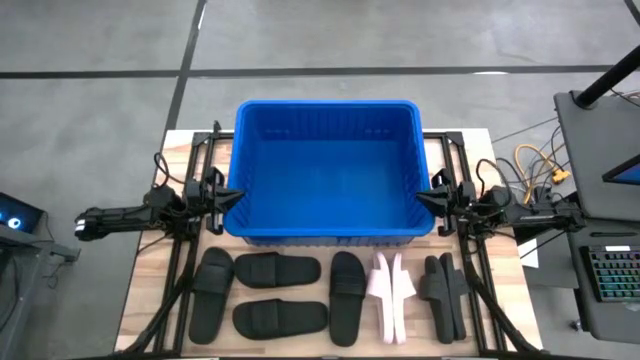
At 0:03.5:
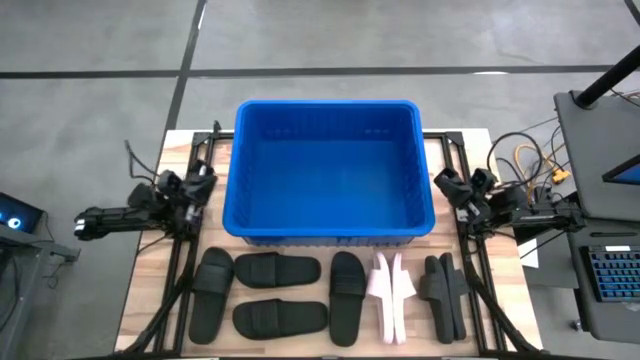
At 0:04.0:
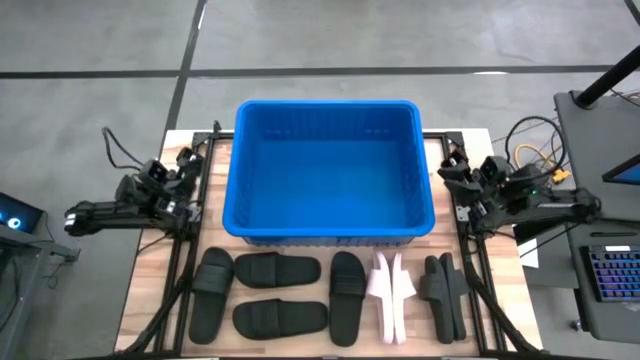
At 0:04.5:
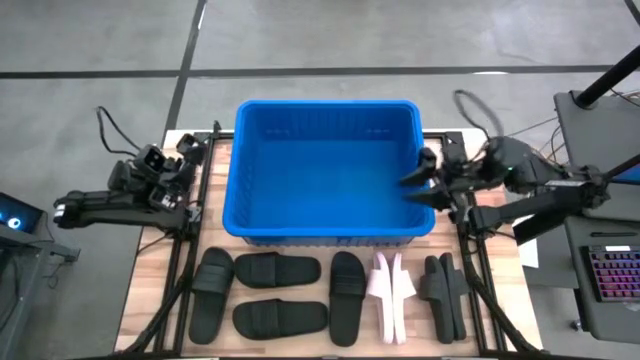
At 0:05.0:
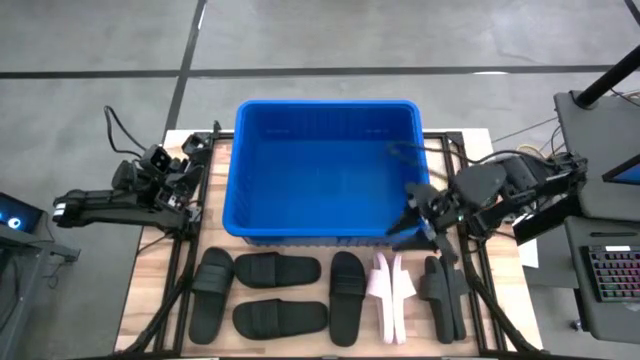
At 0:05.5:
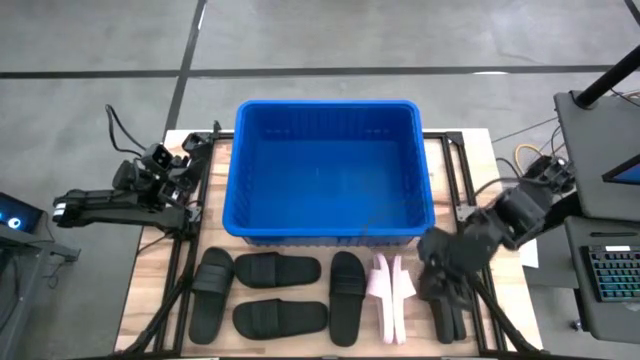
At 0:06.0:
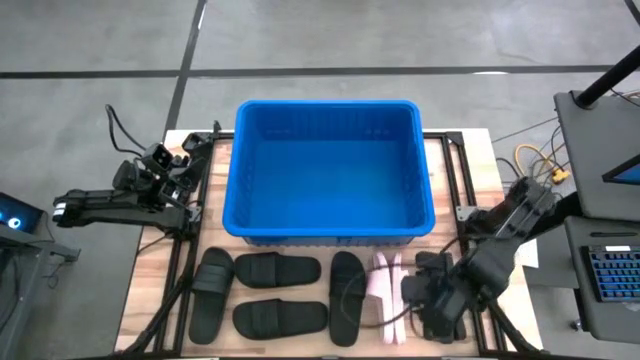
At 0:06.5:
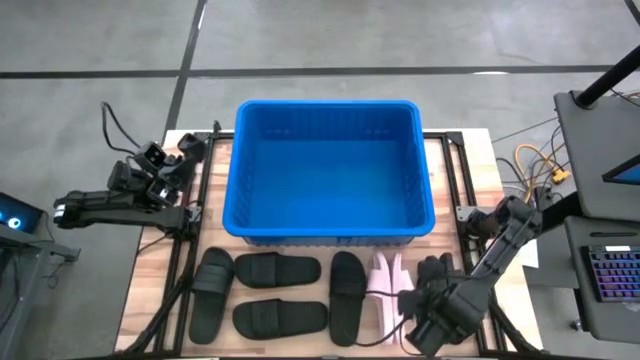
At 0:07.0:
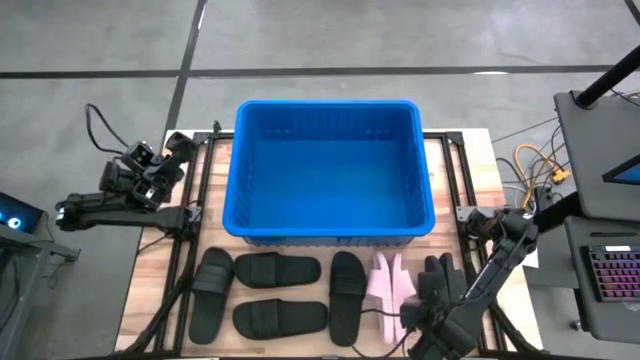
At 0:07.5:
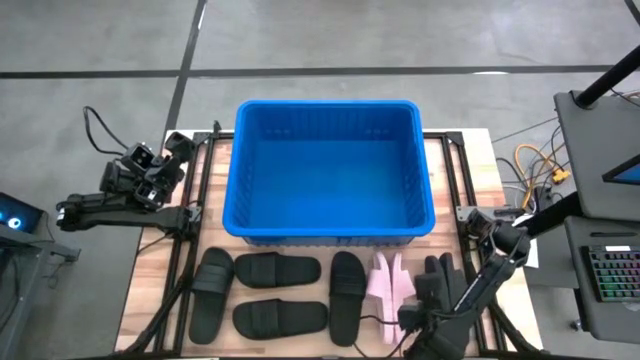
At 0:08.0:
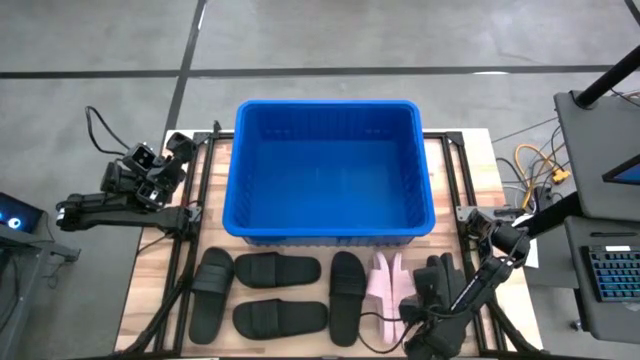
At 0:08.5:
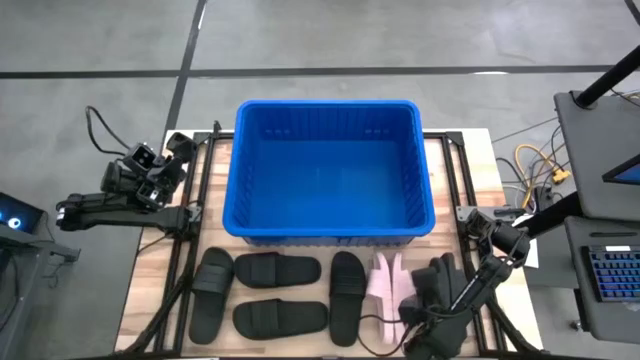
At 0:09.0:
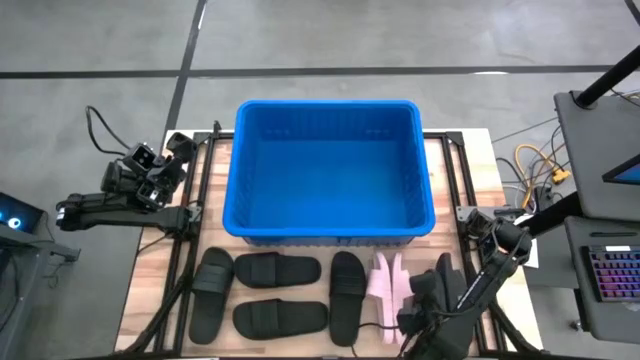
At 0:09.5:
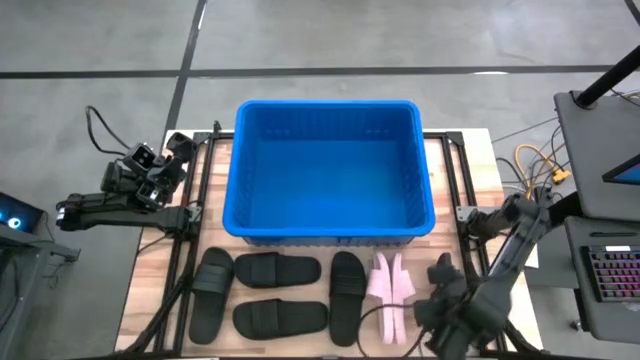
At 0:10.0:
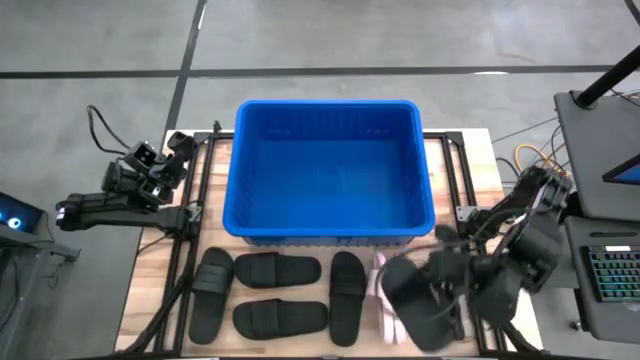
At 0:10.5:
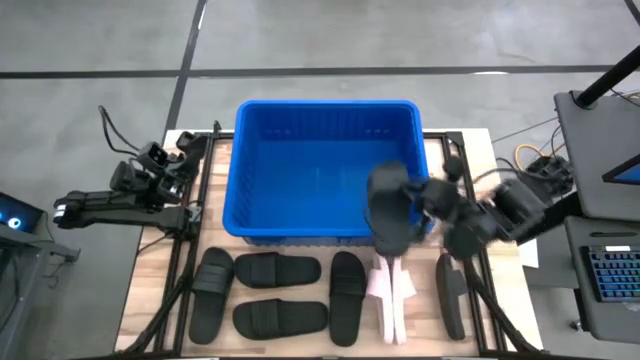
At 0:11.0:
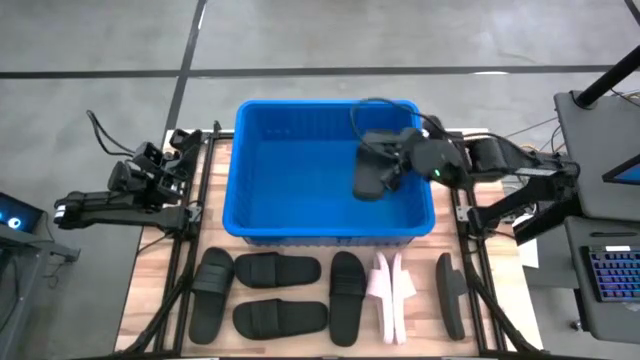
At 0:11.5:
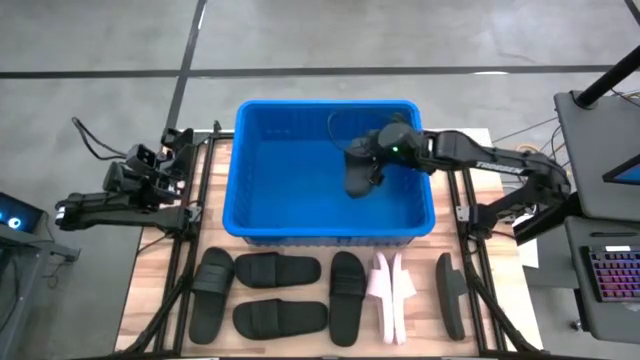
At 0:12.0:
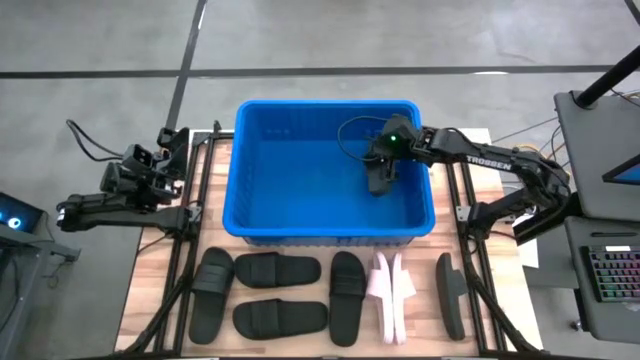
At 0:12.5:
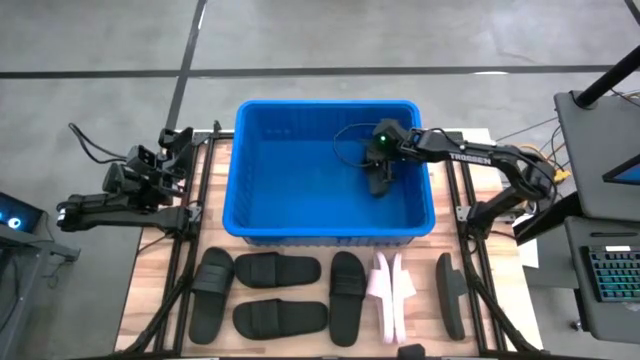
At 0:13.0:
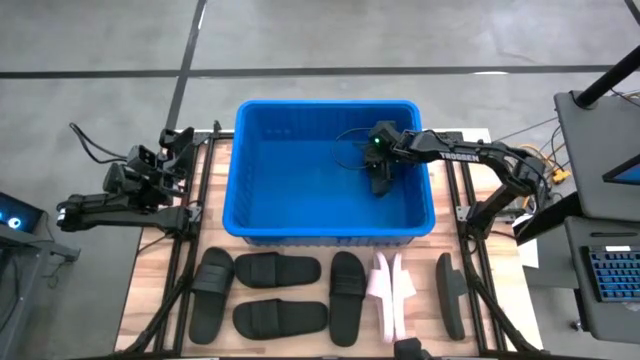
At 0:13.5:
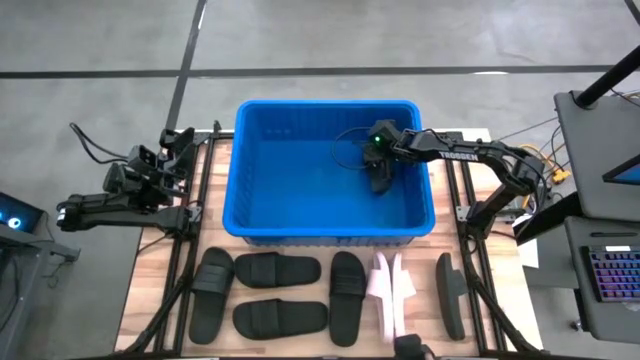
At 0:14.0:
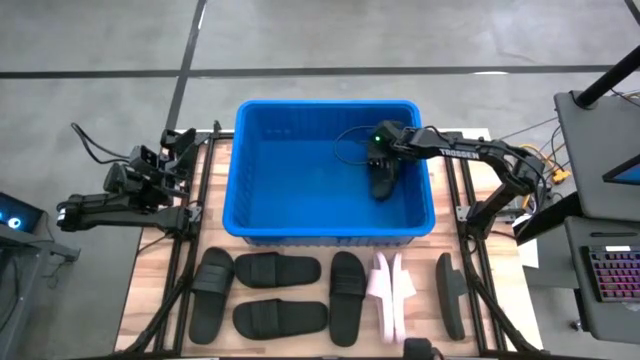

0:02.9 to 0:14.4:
Task: Pick and place slides into bin
Put the black slide into the blue bin

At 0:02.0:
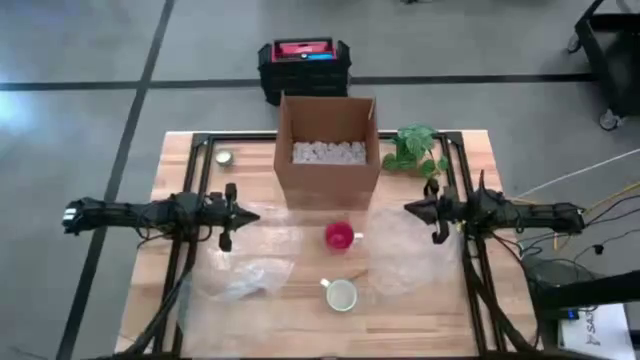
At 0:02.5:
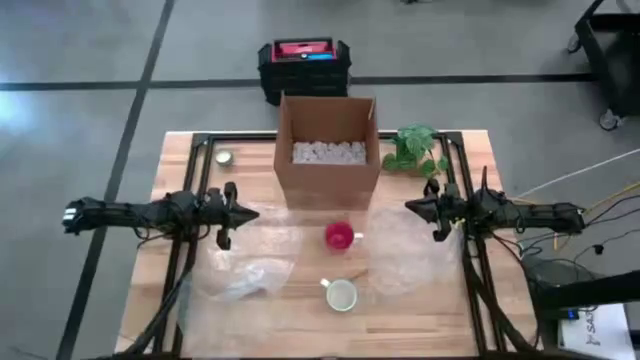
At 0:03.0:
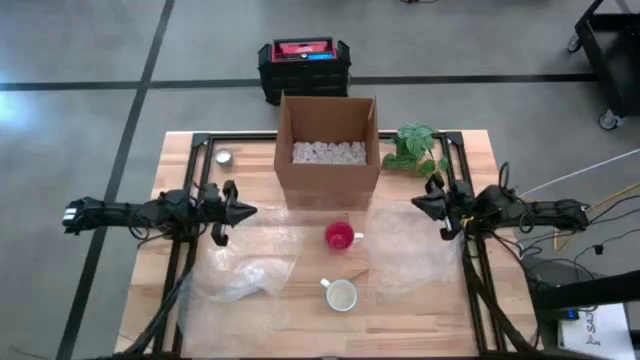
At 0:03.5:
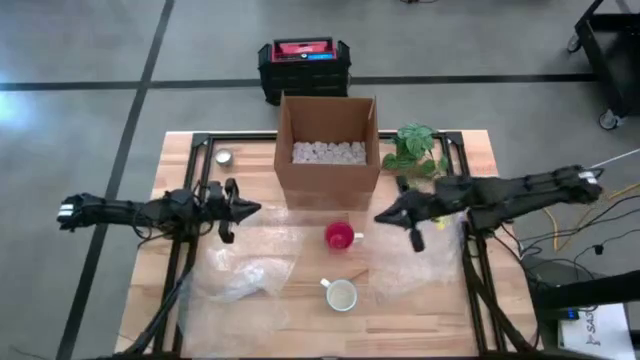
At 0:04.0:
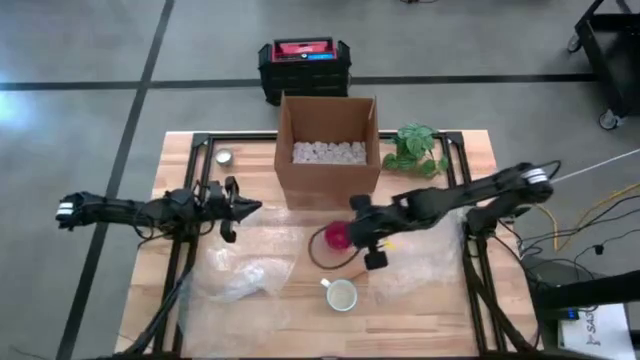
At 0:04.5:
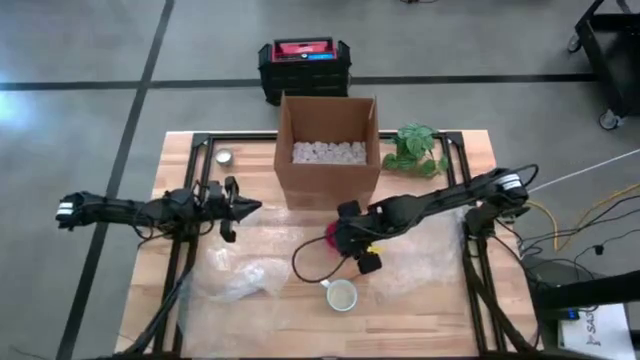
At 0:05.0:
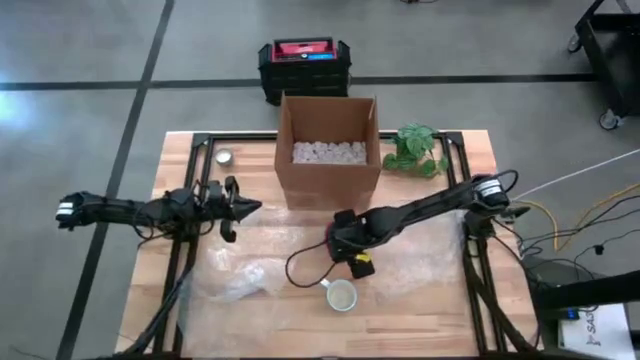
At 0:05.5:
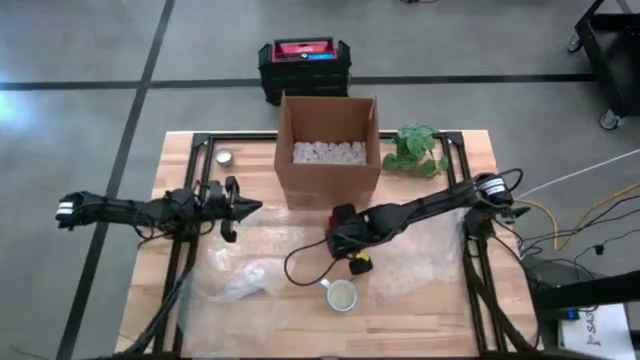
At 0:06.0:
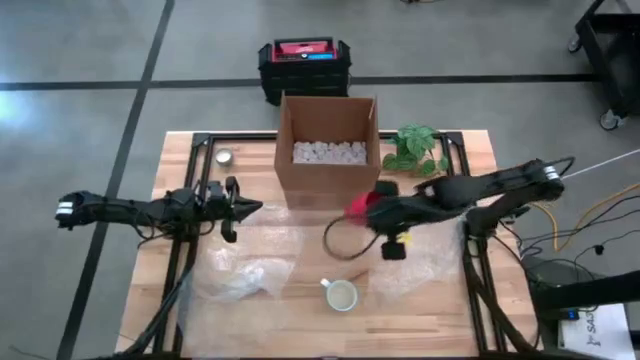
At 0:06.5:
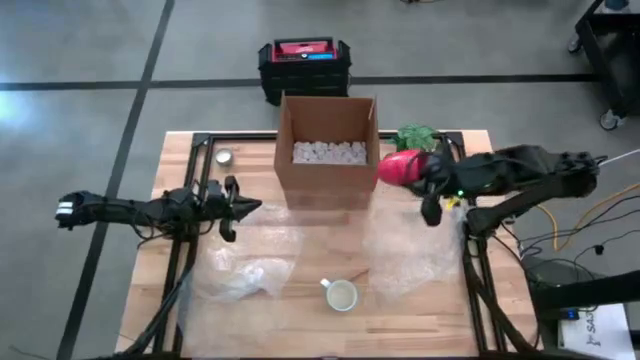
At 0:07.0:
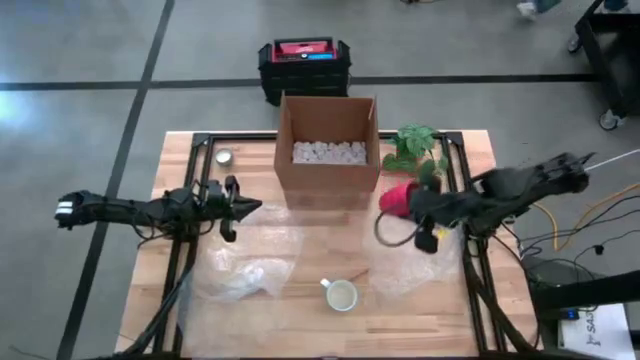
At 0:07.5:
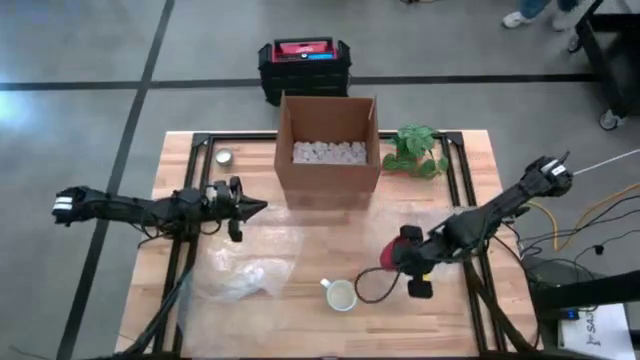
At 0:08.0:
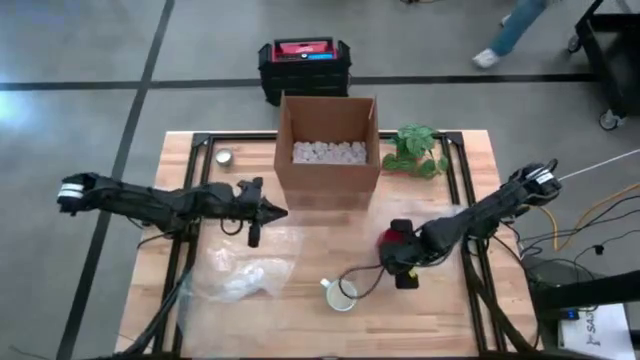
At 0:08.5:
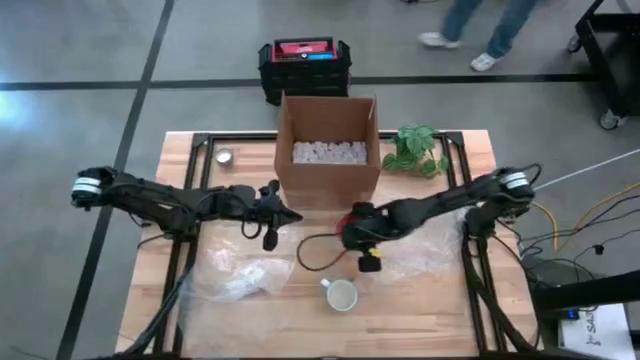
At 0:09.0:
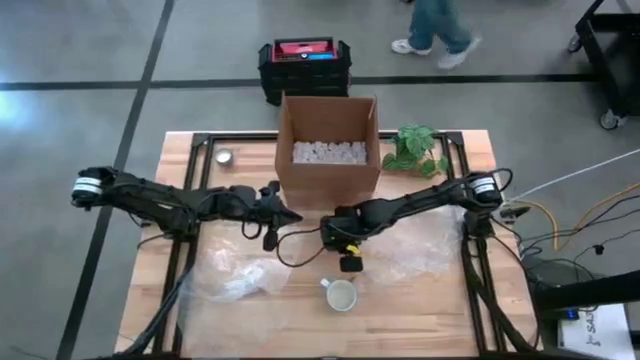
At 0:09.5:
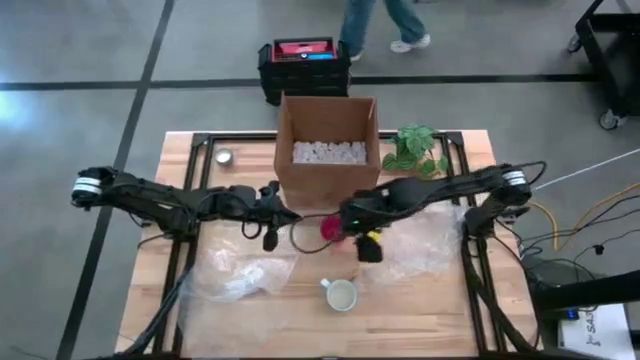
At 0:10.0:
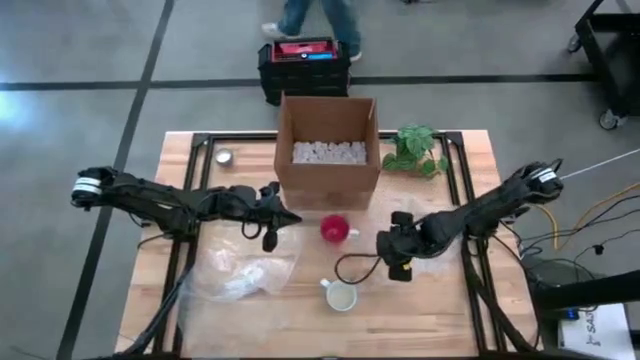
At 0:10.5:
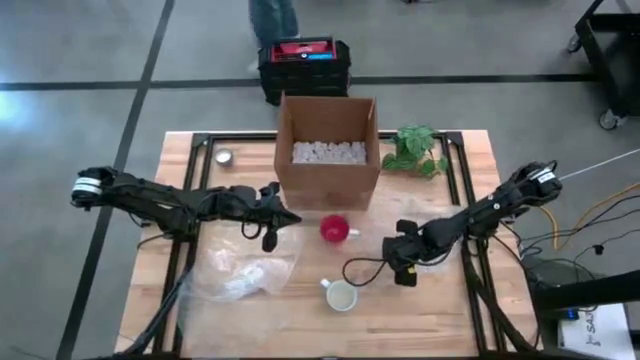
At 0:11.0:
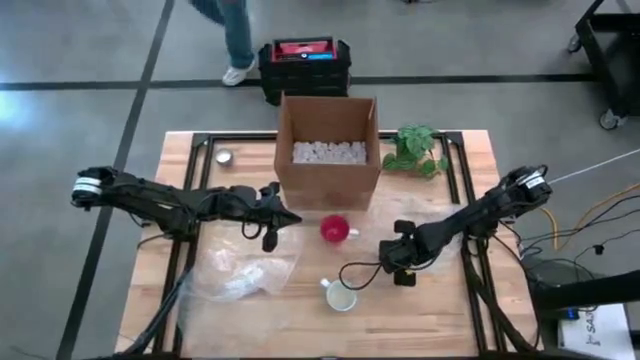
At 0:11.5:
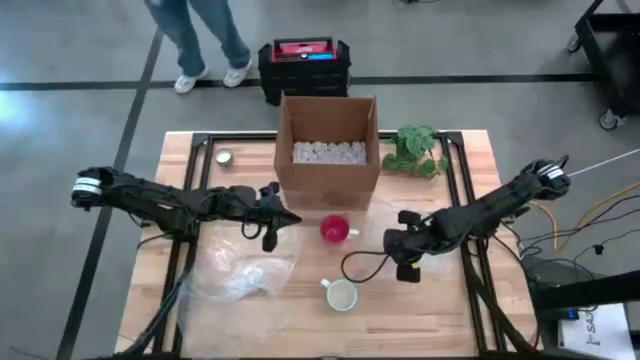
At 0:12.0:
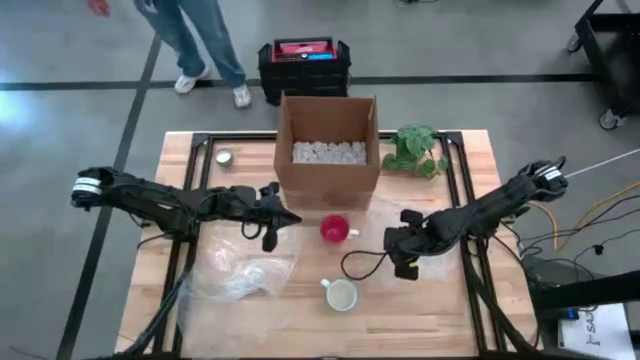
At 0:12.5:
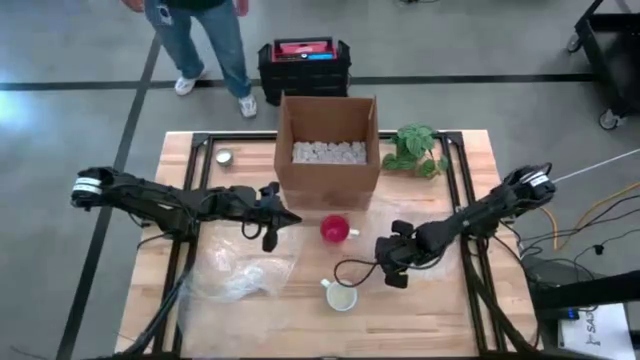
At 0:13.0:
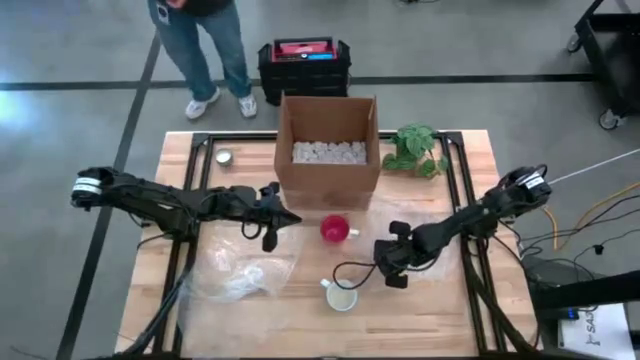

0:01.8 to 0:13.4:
Task: wrap mug
Wrap the orange mug in bubble wrap
